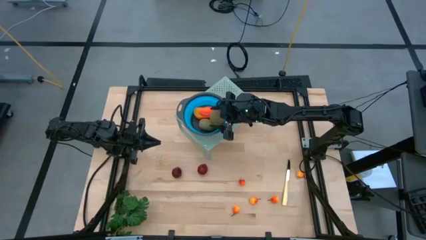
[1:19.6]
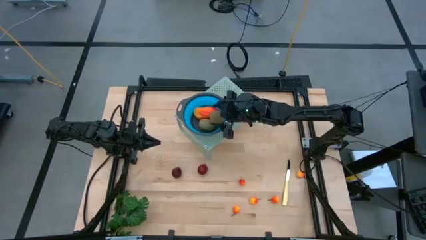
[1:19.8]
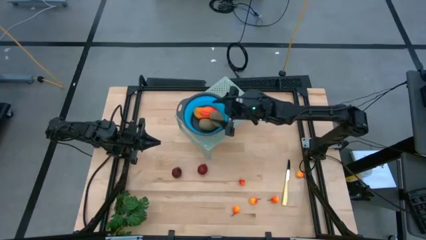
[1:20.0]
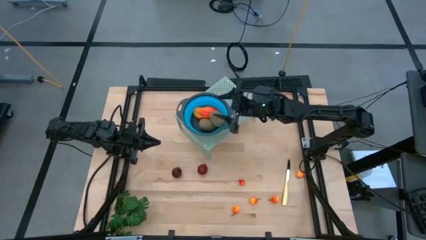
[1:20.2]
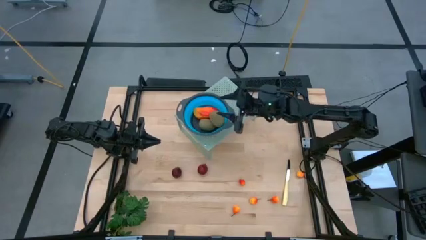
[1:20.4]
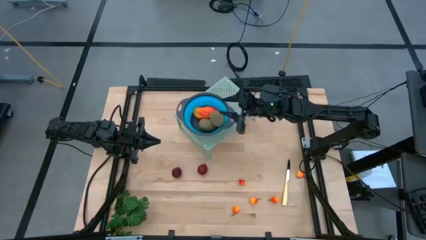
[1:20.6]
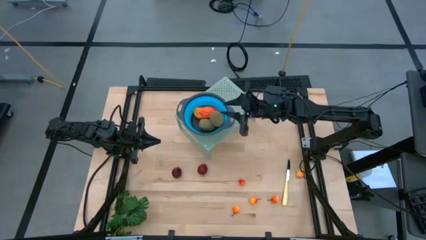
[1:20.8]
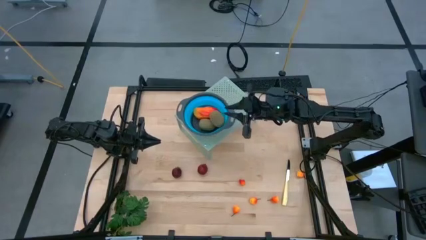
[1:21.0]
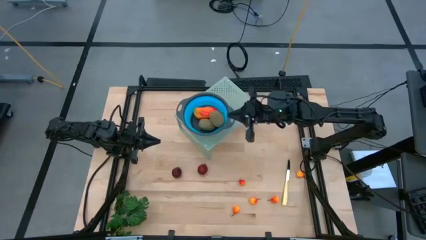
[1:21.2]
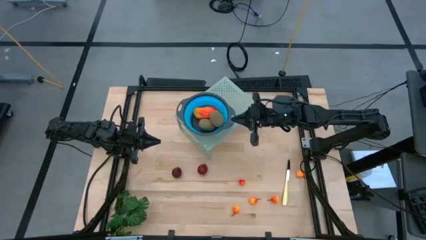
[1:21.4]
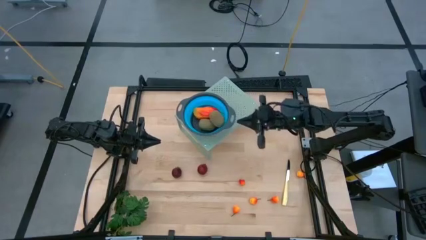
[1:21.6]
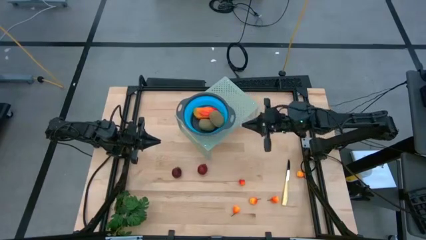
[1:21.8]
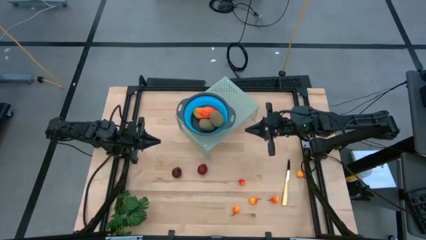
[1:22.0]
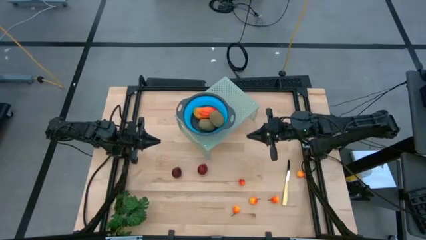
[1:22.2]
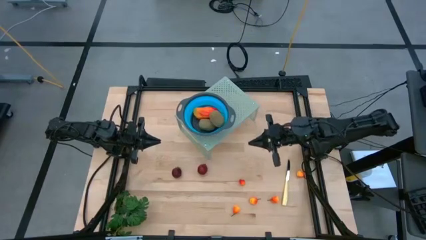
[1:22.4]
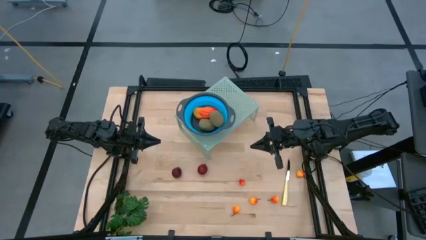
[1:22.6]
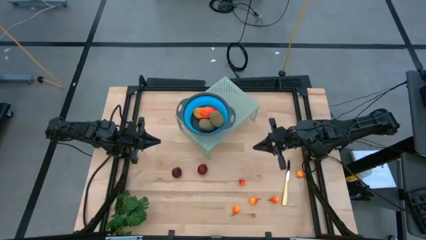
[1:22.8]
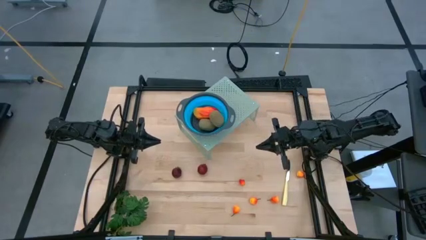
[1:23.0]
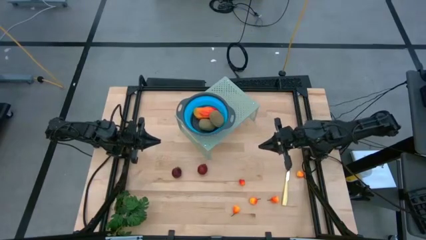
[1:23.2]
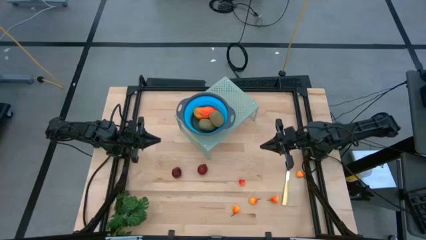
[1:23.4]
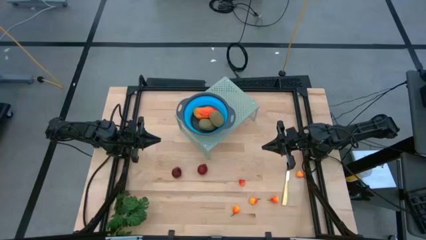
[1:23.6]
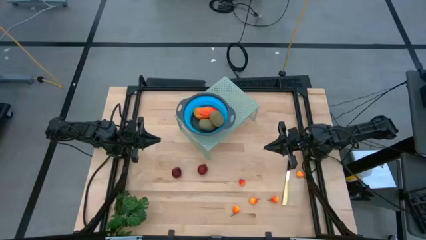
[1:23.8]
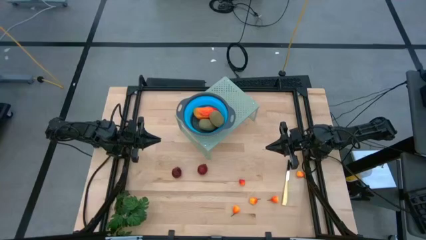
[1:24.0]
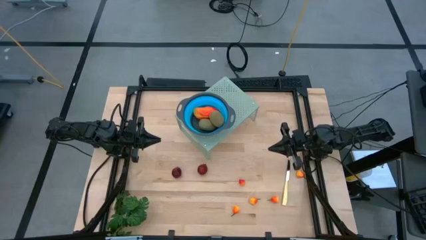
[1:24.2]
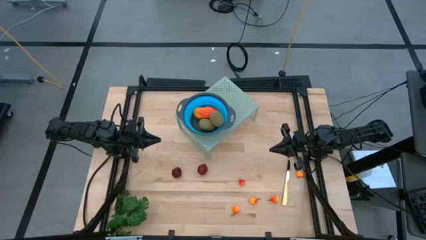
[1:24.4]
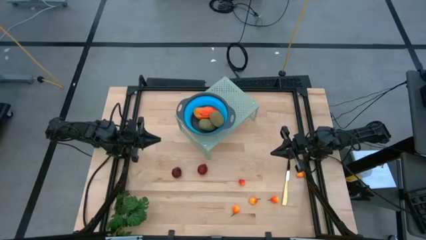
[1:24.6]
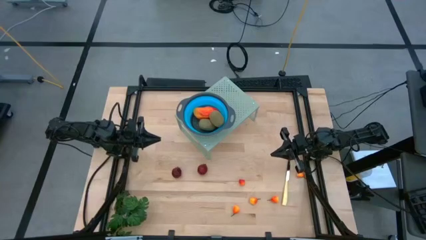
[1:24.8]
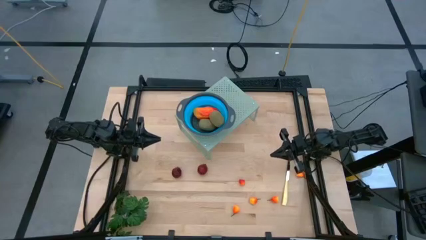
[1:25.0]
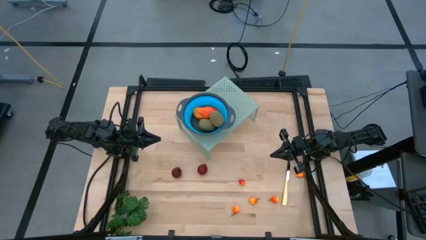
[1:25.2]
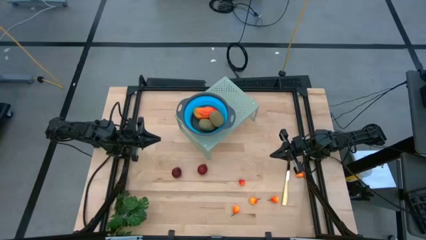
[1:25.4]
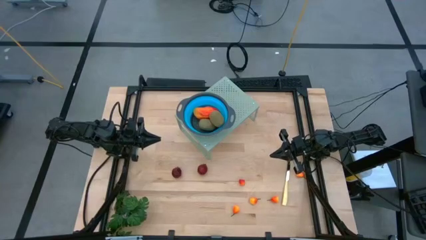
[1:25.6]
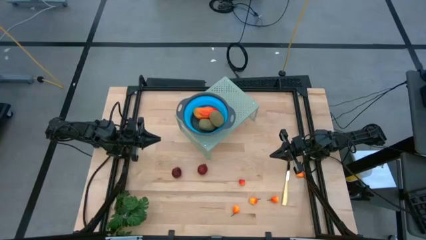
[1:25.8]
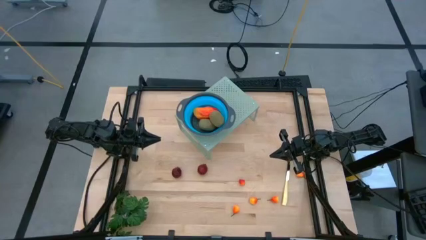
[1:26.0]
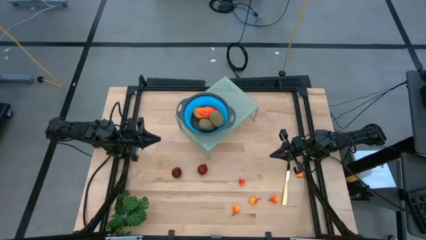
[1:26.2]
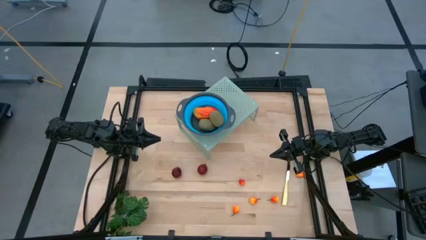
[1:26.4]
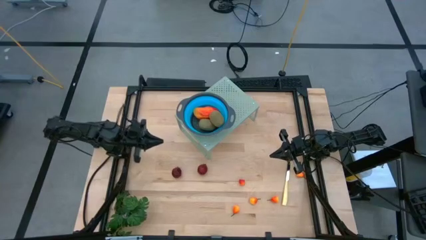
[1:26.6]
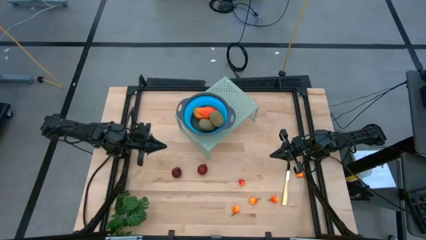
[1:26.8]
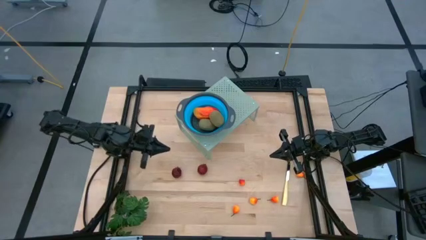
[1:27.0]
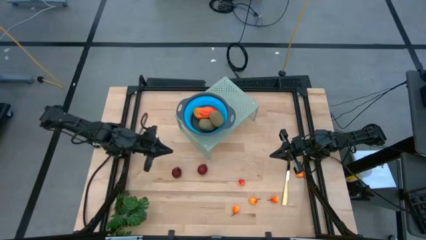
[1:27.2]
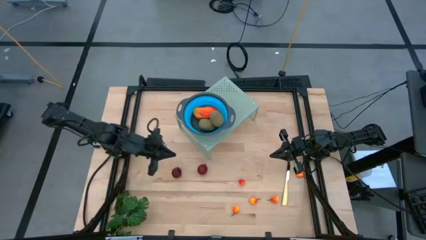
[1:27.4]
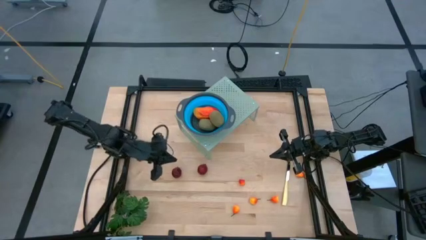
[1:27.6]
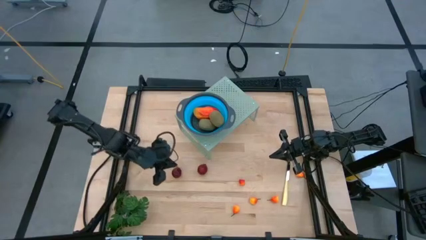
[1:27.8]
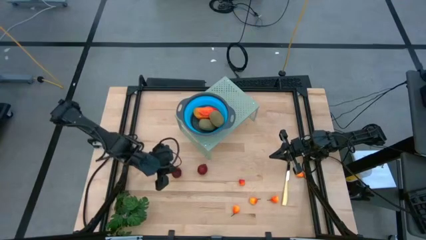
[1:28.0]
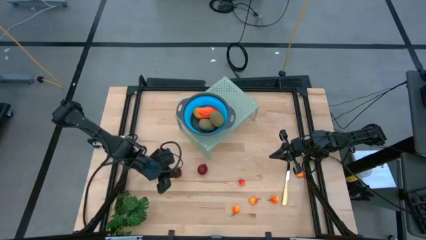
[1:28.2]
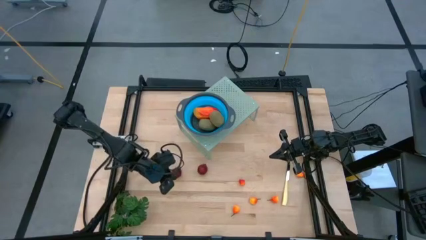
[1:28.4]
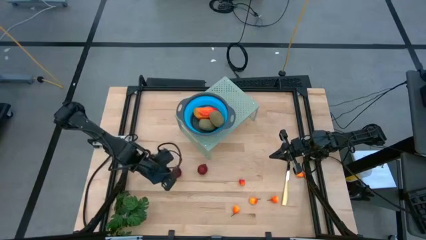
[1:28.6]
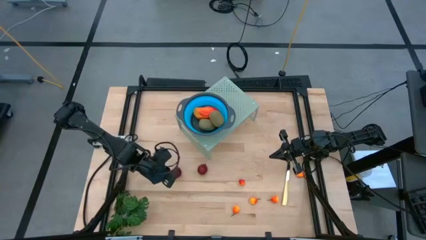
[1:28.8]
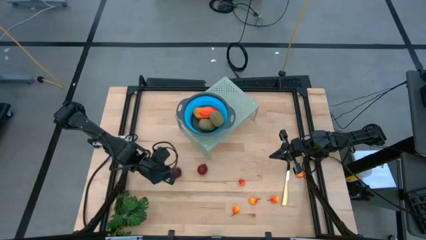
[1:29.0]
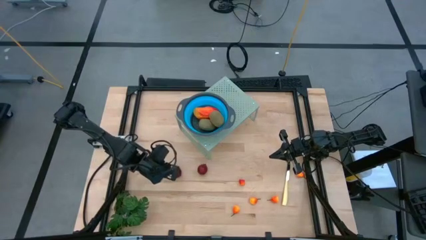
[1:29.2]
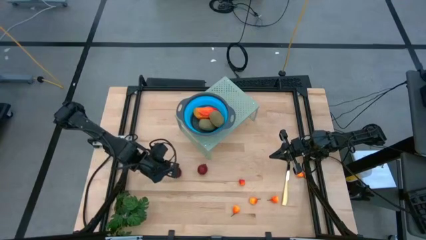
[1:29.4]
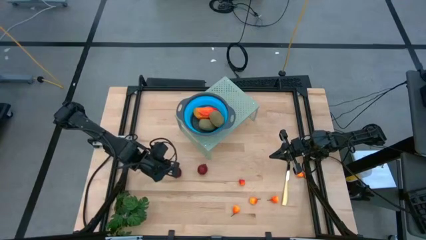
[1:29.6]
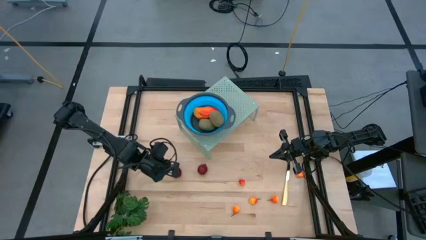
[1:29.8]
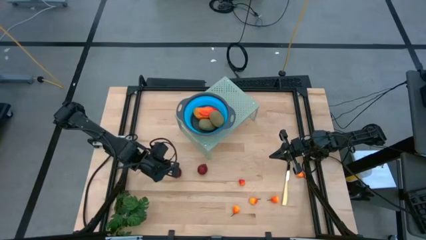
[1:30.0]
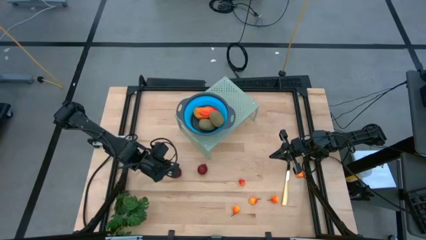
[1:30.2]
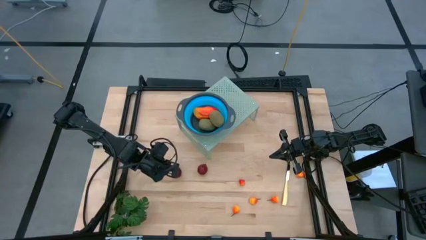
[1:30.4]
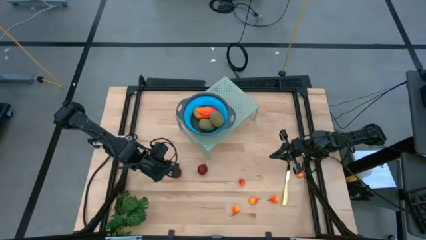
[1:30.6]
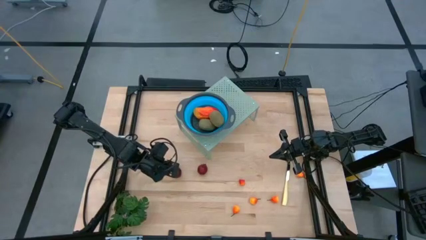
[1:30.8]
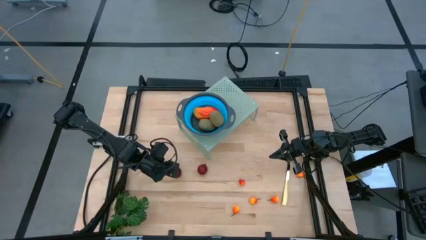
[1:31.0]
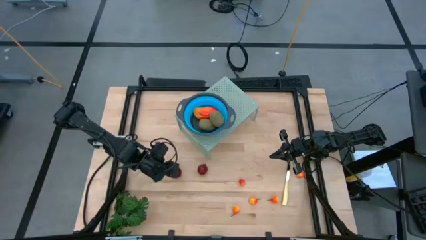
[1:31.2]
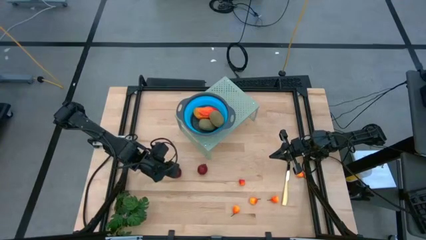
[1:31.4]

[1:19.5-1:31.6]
Task: Pick & Place Fruit
Put the pomegranate into the collapsible colander on the shelf
